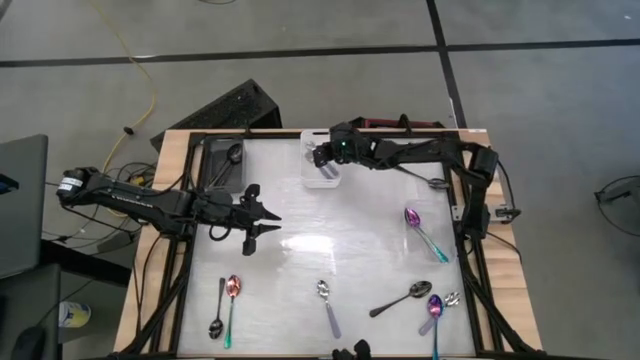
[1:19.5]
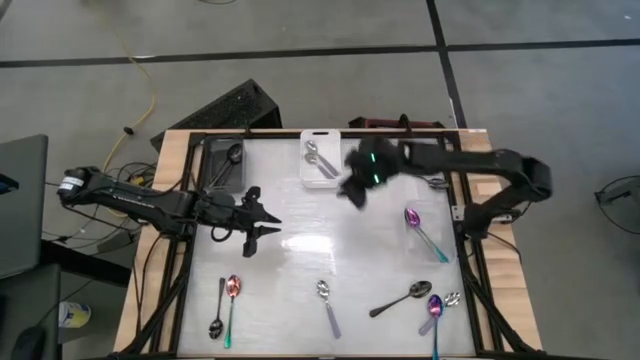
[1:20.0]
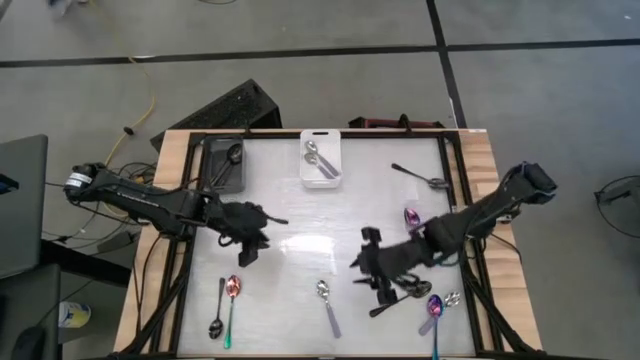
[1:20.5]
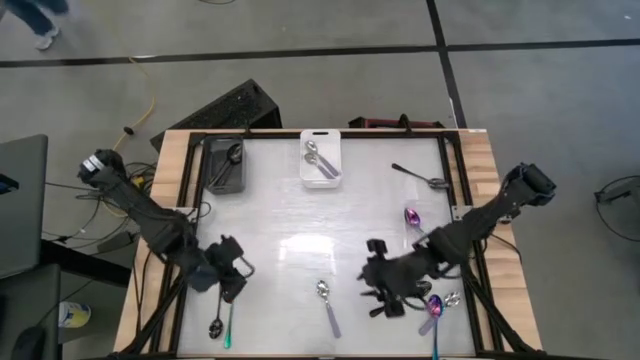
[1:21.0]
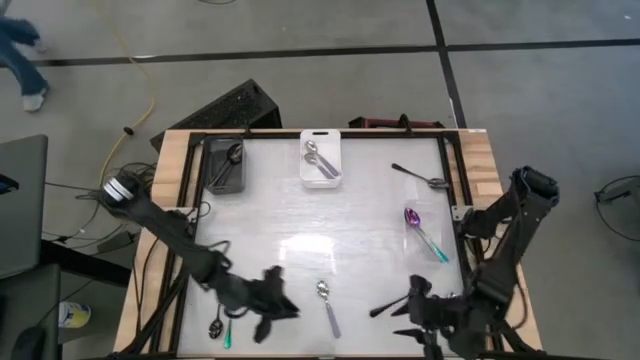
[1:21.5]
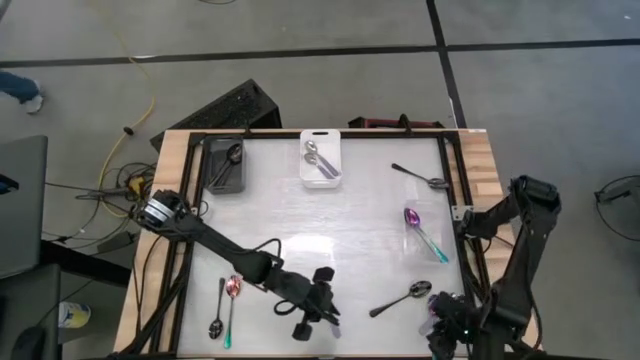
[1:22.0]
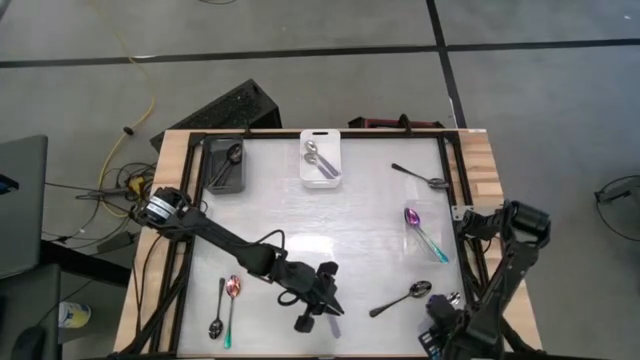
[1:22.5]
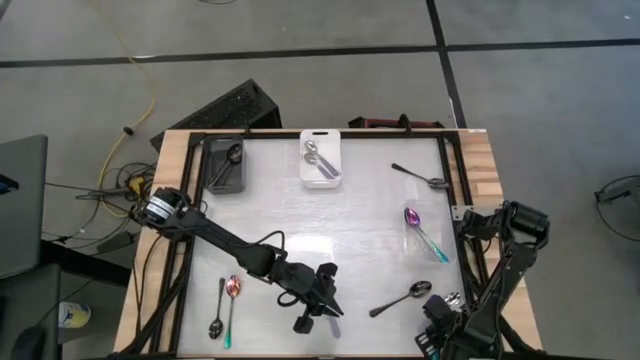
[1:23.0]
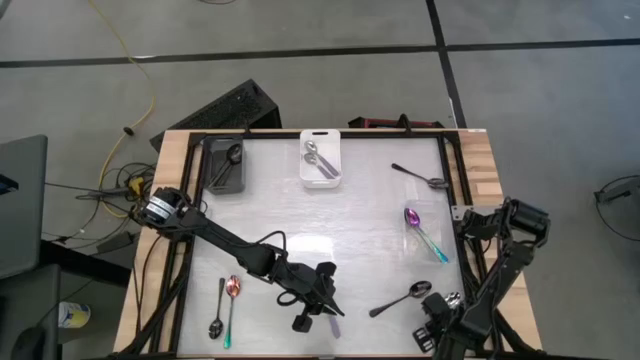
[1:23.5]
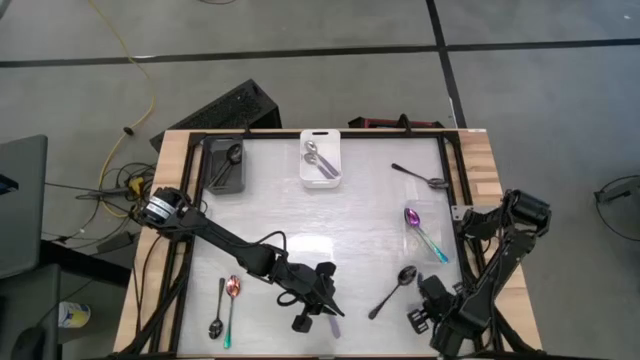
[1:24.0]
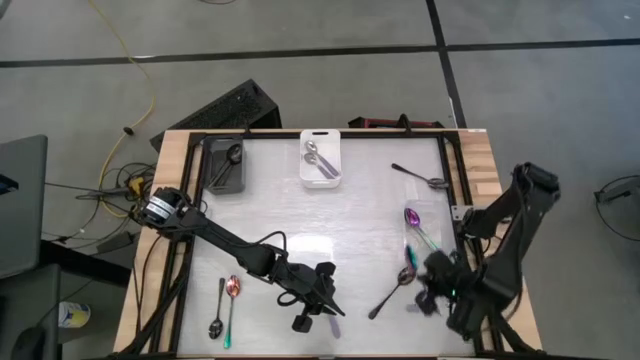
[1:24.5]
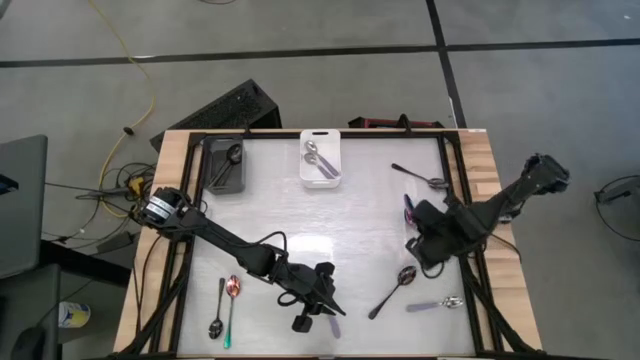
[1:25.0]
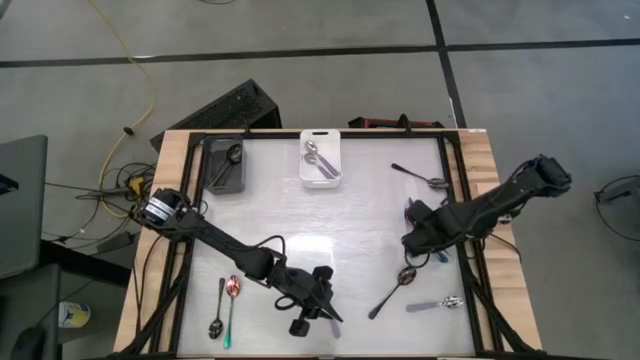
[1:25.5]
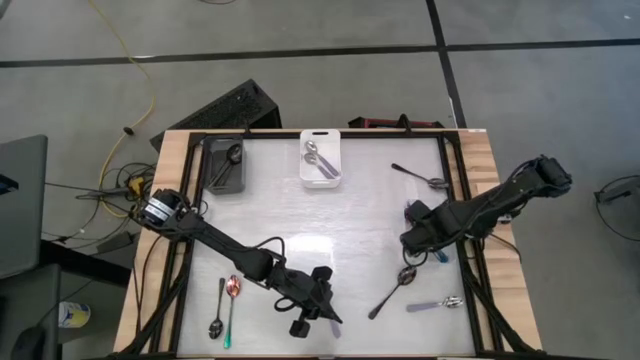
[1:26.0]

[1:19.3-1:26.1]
Task: Sort silverware by color (type)
Put the blue spoon into the transparent bin

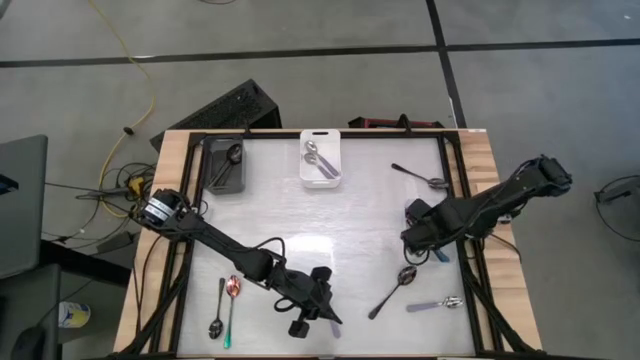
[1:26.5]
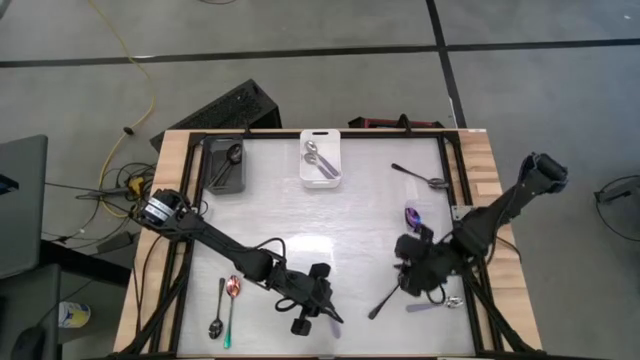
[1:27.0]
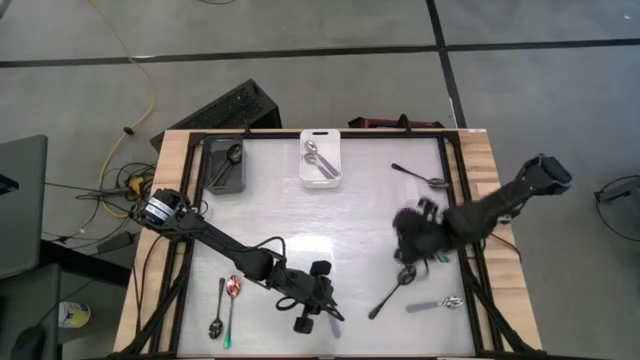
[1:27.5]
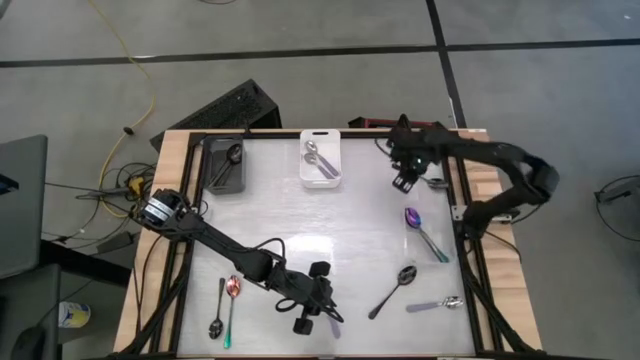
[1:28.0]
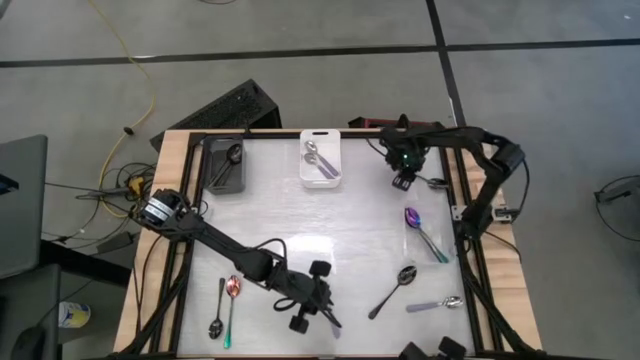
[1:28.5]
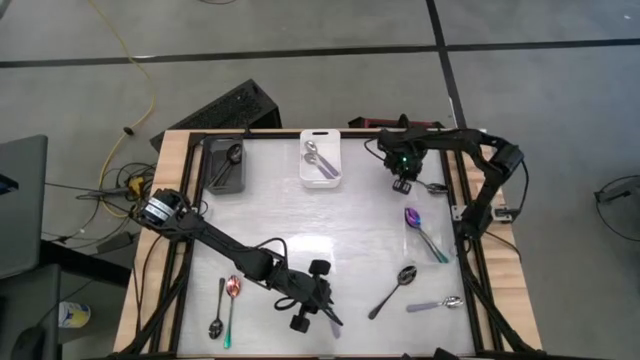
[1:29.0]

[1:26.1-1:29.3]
Put the black spoon into the black bin

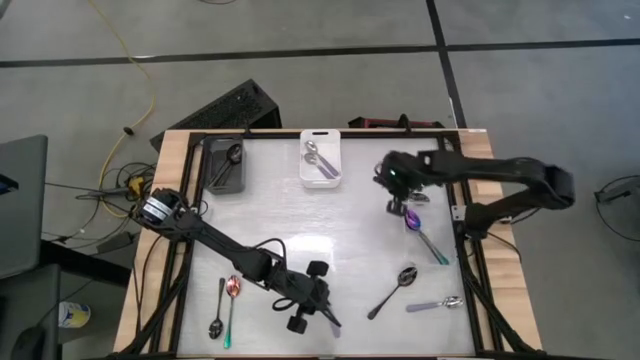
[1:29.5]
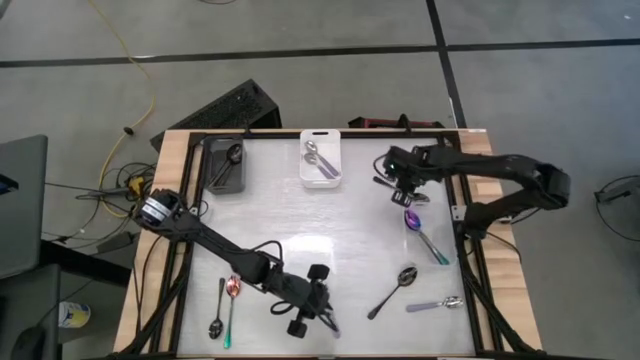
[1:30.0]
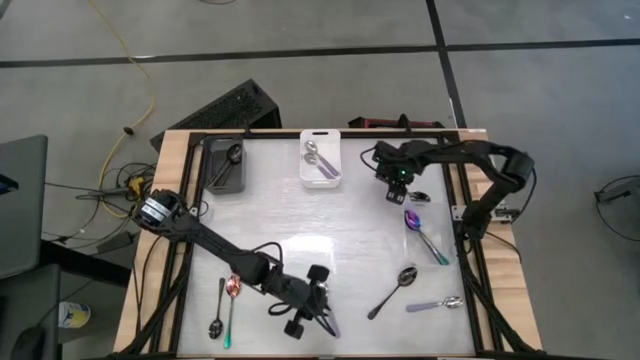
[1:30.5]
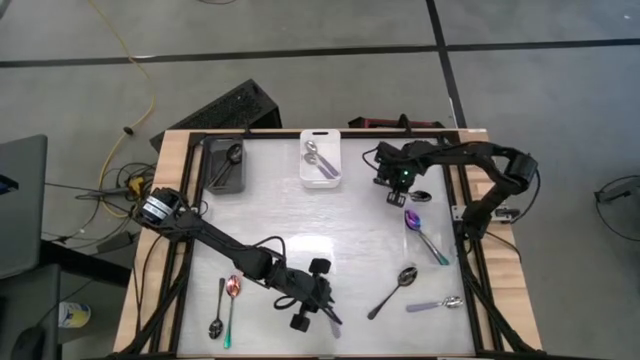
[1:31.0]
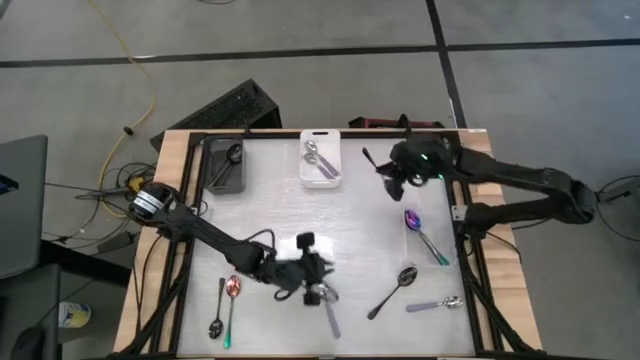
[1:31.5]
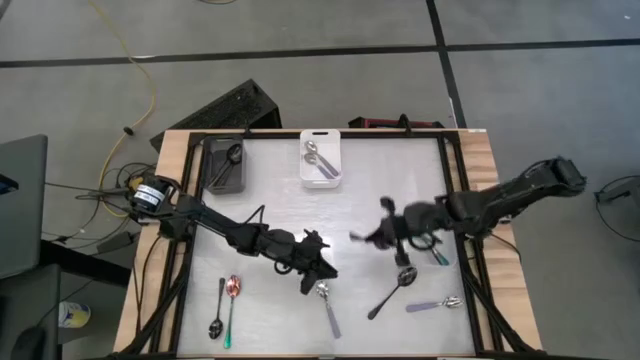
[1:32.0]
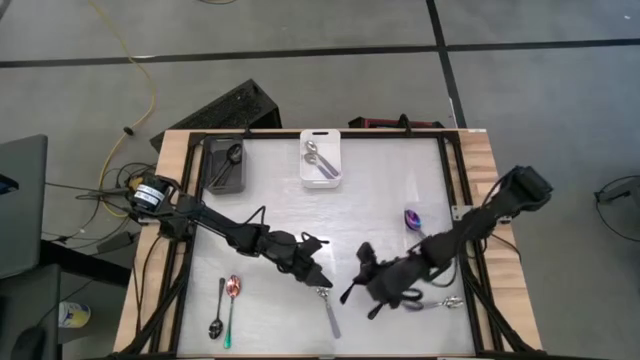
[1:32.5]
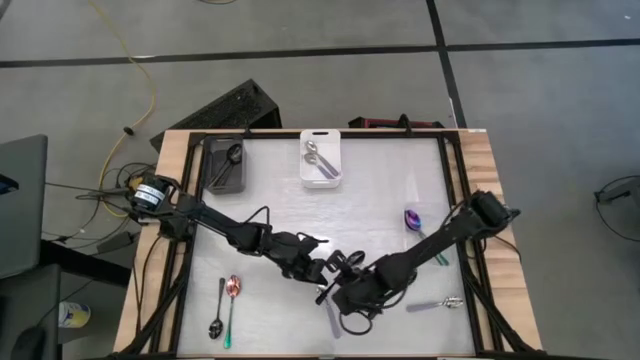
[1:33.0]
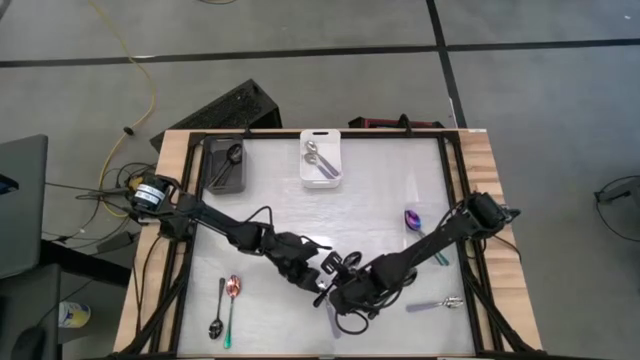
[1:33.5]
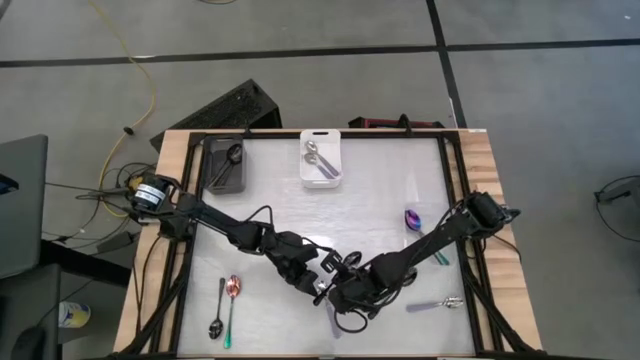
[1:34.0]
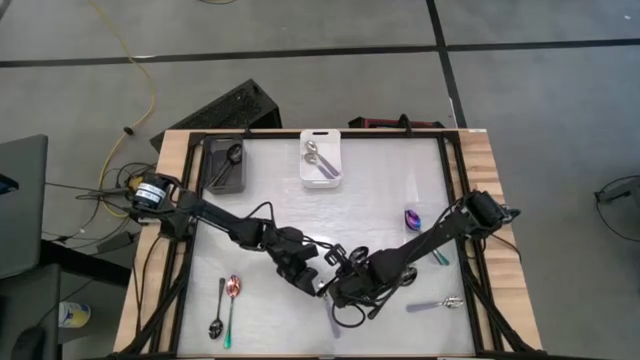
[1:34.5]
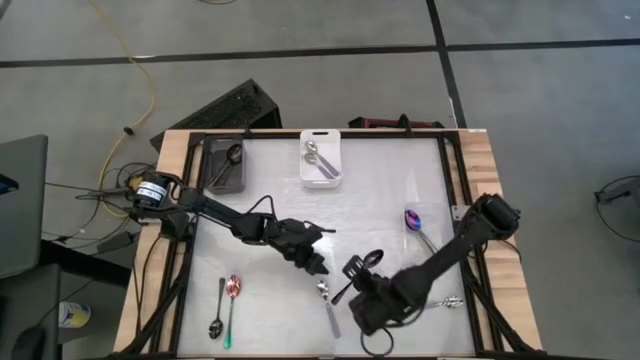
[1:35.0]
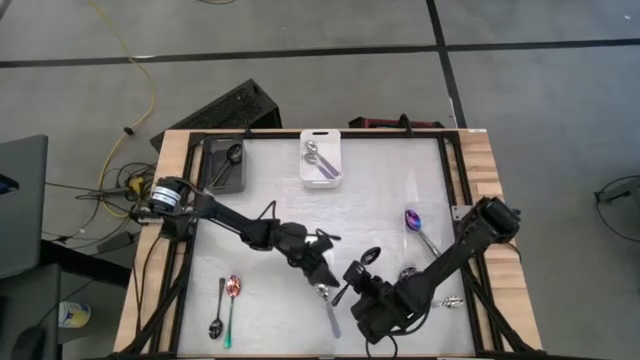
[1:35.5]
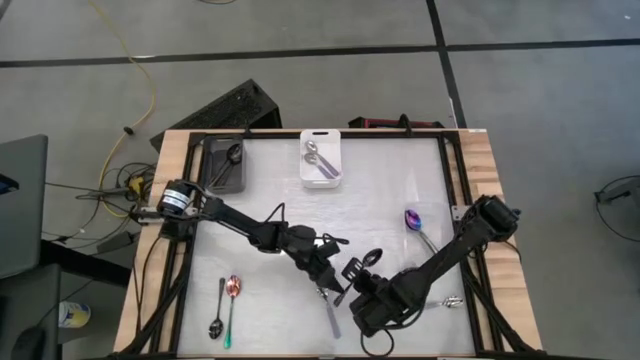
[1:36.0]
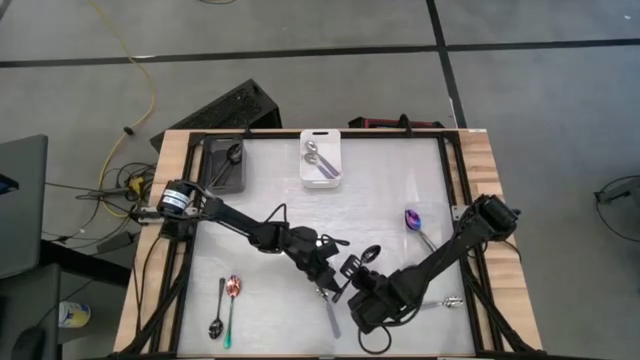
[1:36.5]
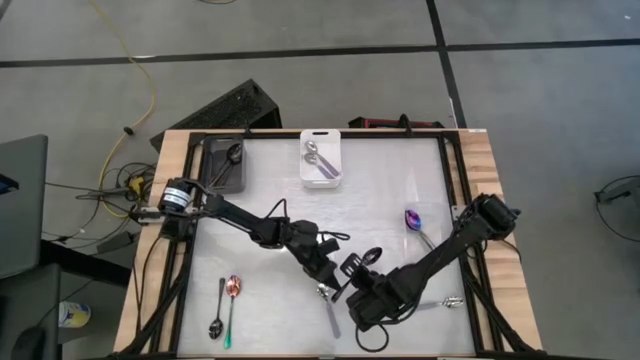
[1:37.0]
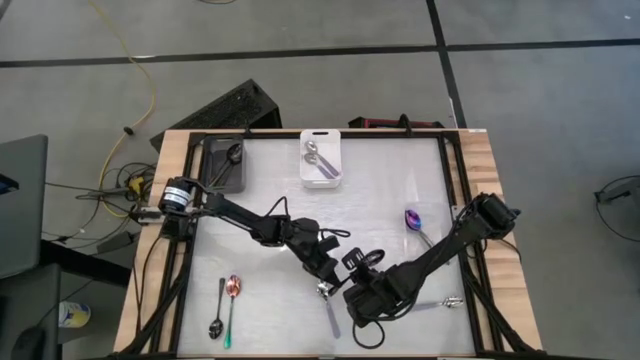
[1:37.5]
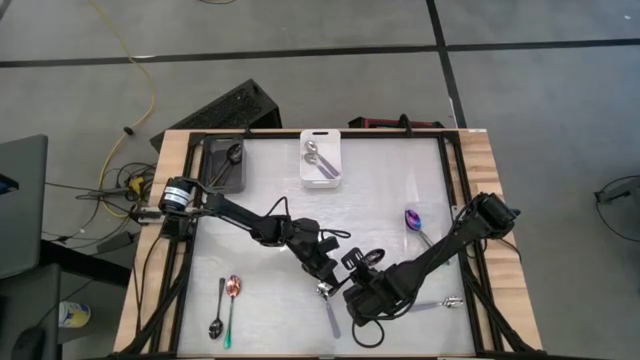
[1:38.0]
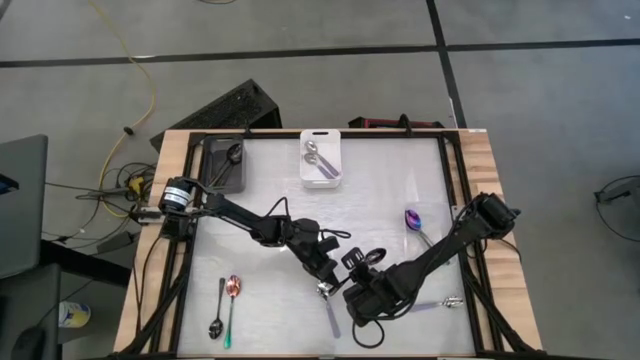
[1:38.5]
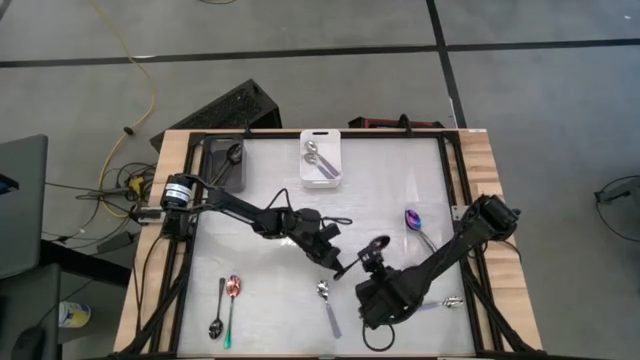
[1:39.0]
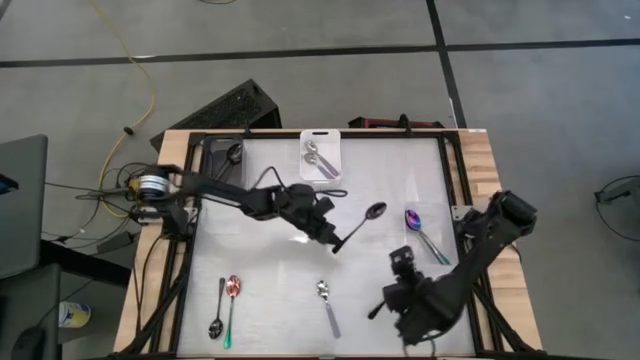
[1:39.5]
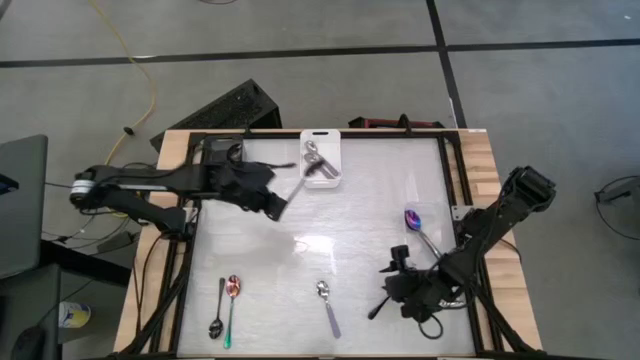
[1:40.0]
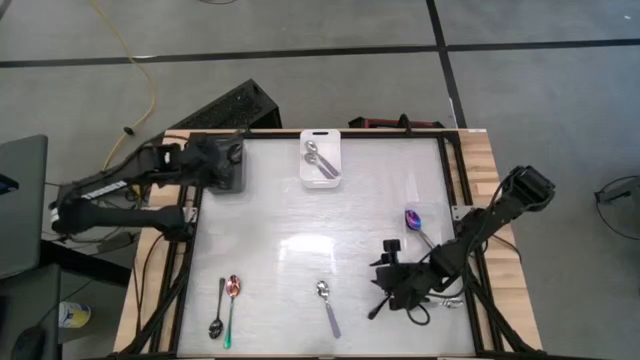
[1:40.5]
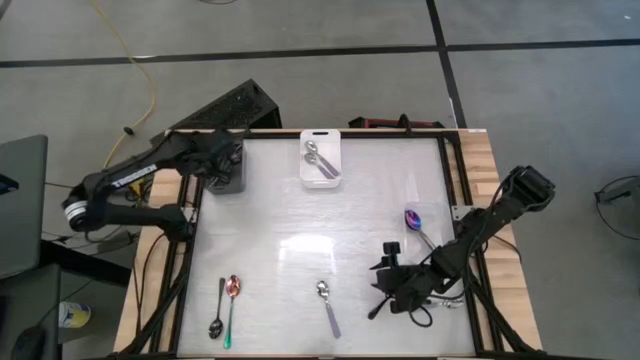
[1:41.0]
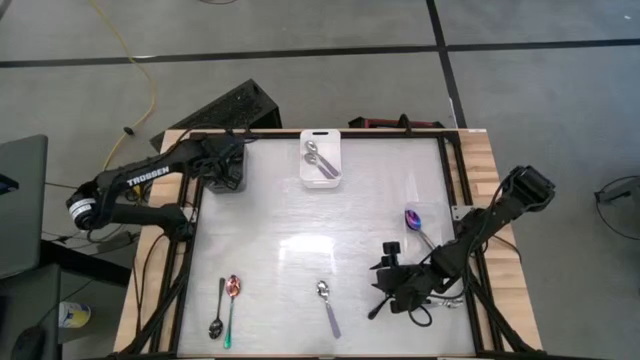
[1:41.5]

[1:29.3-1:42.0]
Put the black spoon into the black bin
